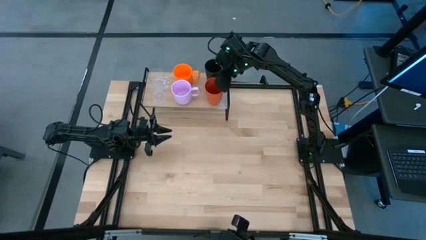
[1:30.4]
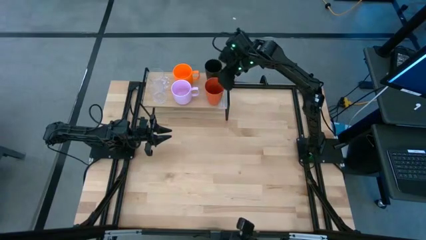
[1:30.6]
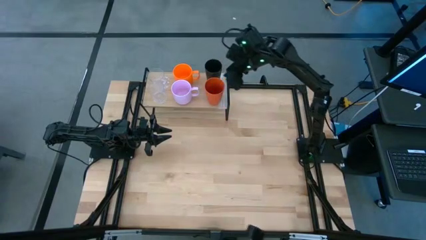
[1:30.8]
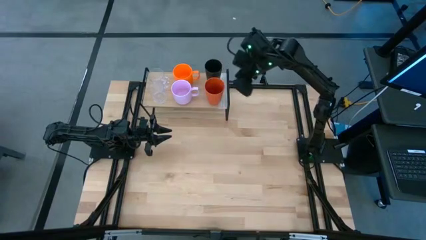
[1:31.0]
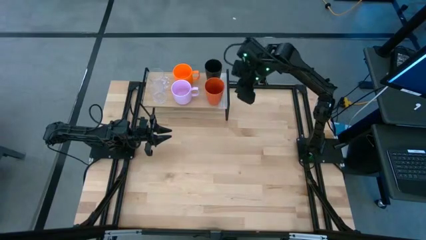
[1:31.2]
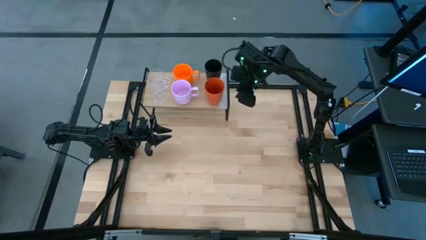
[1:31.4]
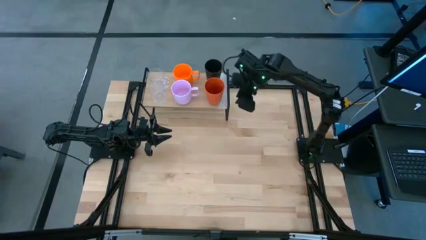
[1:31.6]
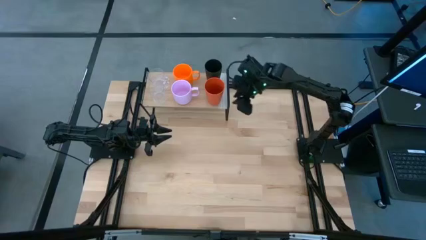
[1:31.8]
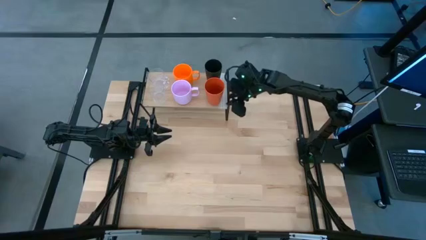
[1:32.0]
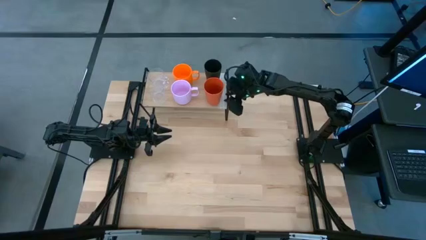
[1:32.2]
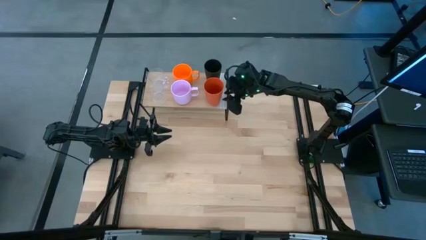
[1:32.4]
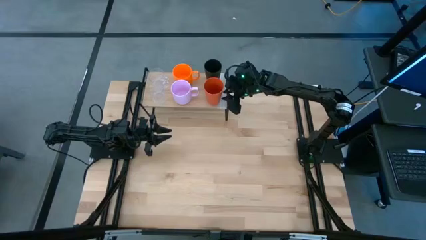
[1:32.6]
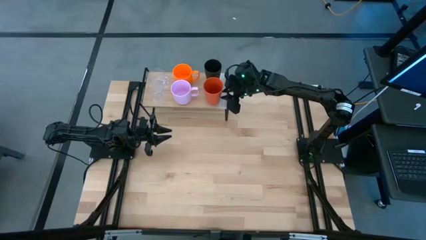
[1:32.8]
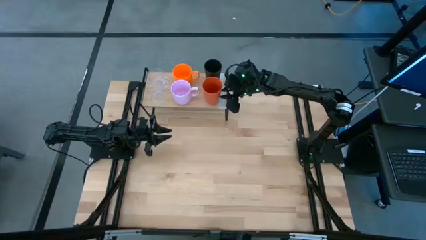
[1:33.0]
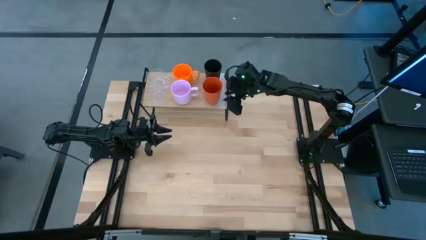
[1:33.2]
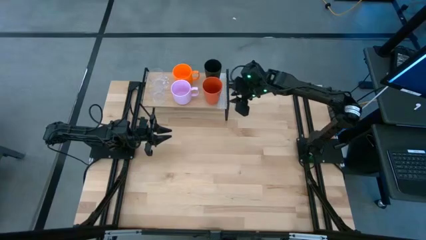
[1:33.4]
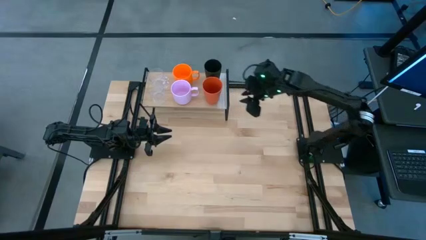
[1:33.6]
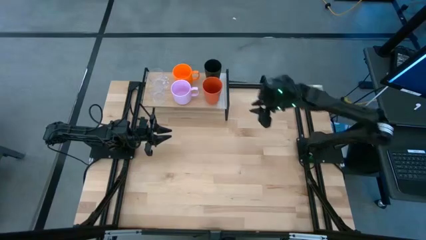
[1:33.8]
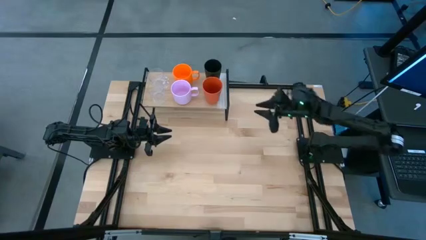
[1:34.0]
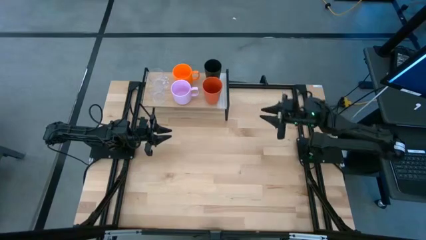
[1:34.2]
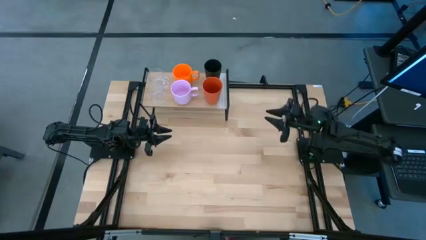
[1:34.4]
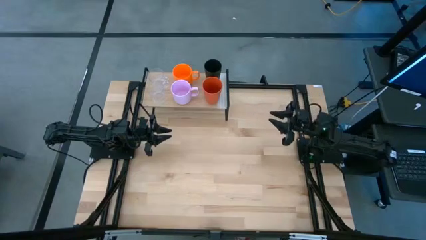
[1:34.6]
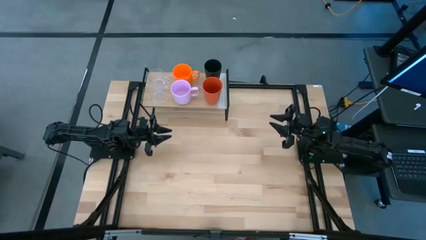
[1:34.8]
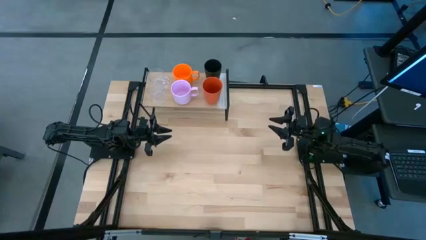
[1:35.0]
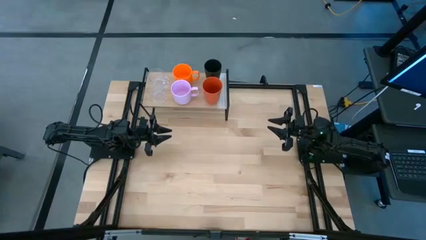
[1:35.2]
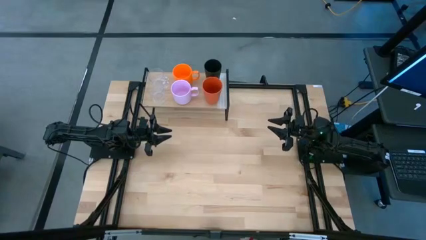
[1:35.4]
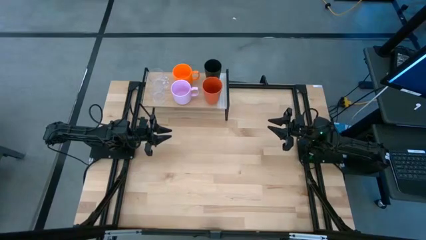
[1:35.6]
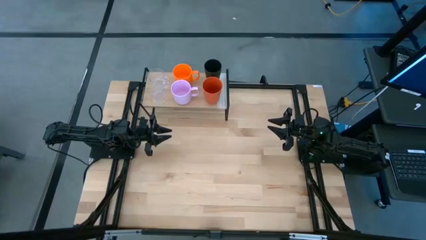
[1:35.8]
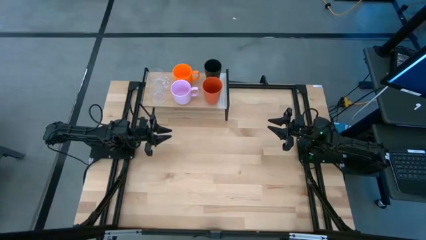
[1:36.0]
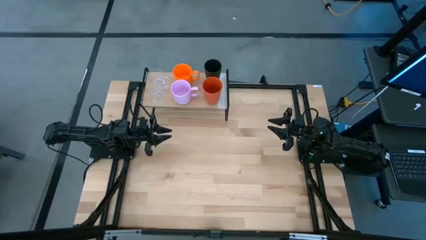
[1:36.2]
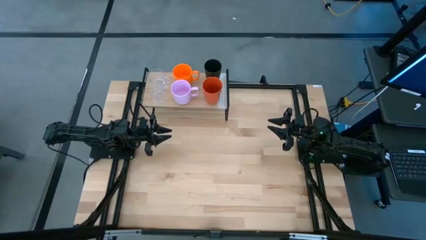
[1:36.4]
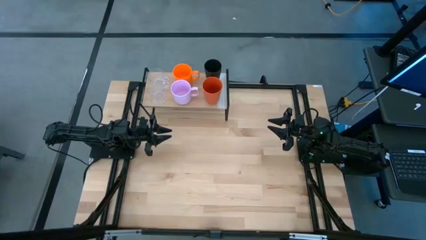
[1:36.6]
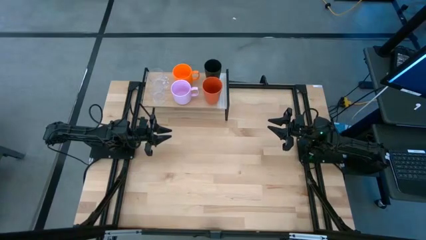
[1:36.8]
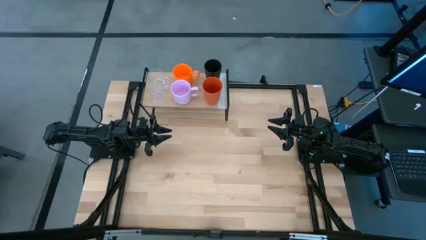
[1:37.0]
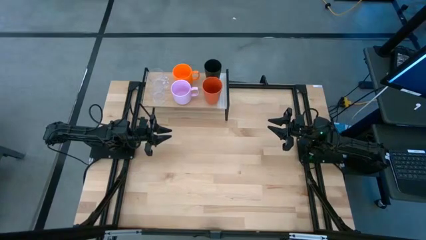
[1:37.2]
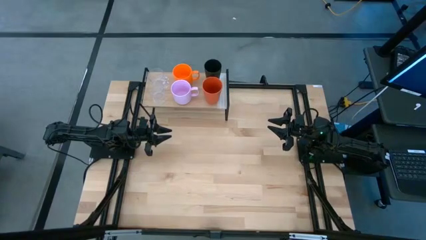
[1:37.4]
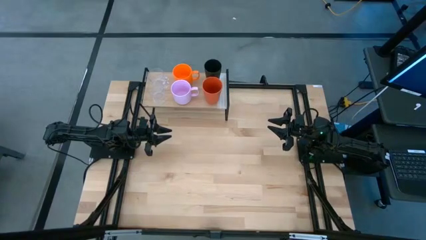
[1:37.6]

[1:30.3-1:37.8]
Task: Stack small to large cups/mugs on shelf
Return to Home Position

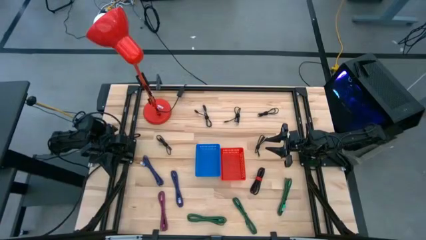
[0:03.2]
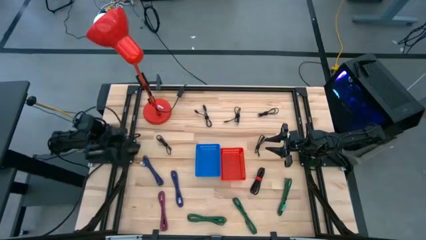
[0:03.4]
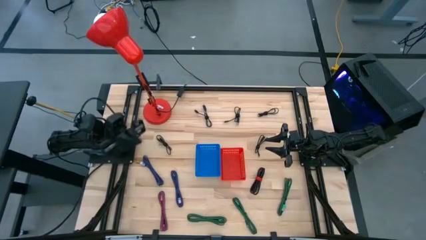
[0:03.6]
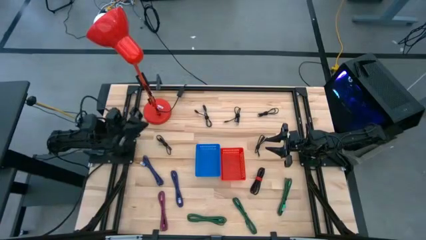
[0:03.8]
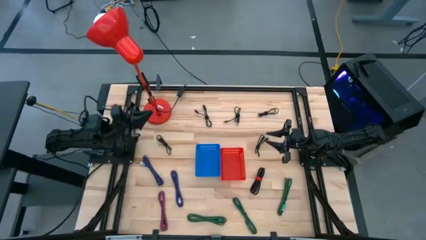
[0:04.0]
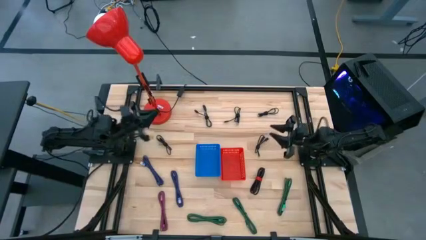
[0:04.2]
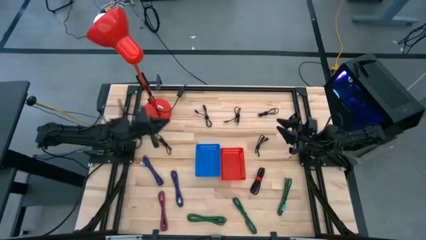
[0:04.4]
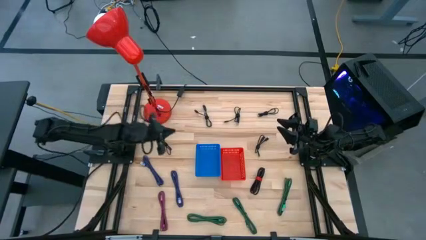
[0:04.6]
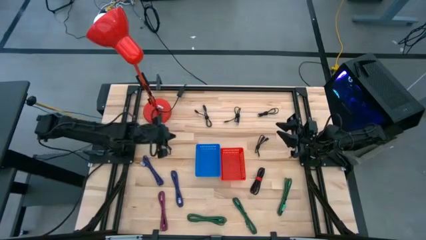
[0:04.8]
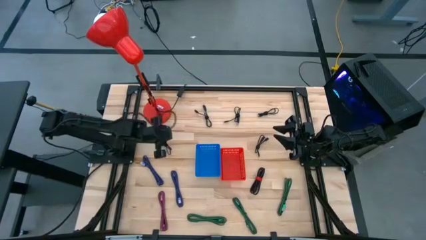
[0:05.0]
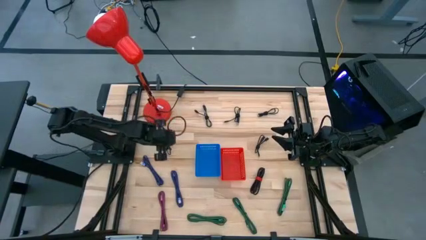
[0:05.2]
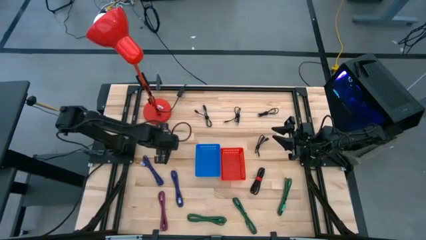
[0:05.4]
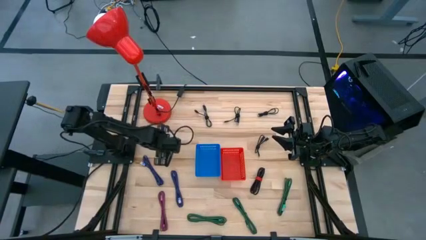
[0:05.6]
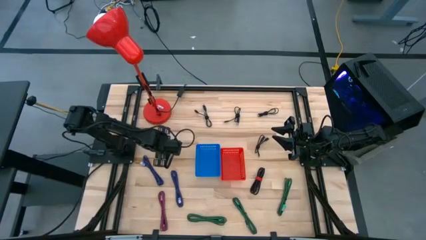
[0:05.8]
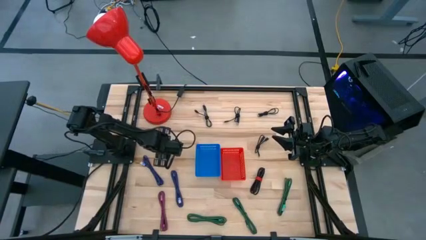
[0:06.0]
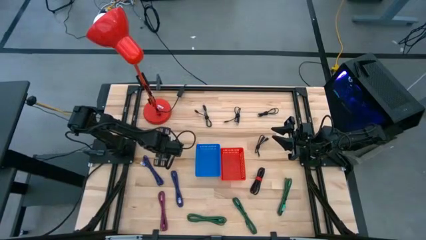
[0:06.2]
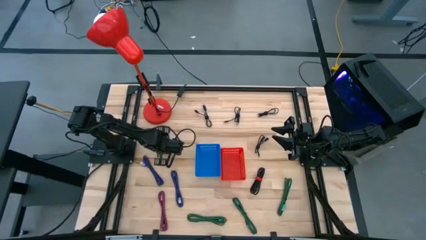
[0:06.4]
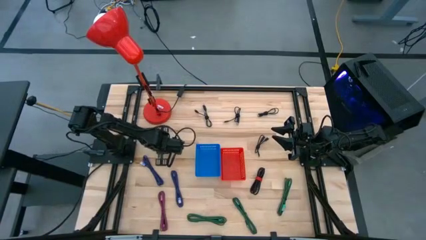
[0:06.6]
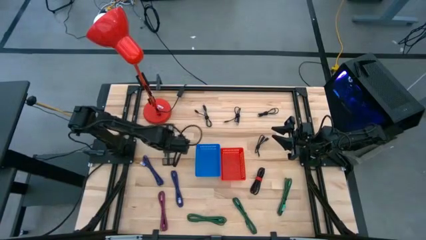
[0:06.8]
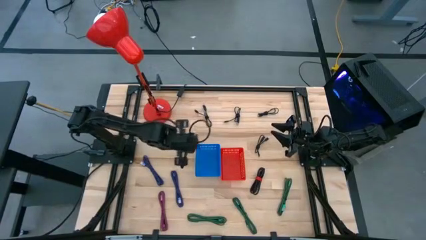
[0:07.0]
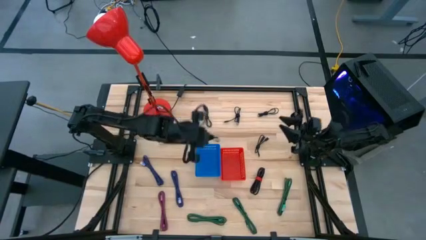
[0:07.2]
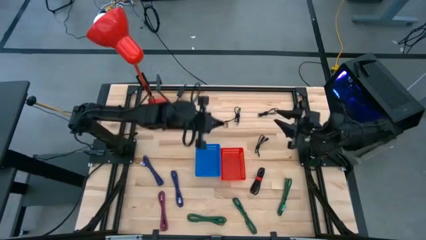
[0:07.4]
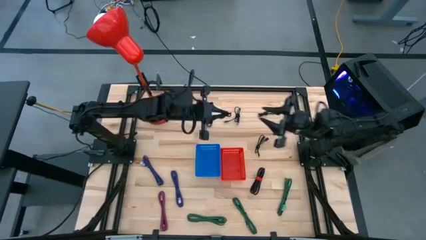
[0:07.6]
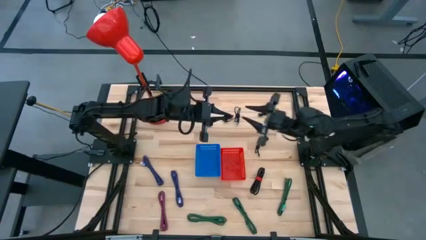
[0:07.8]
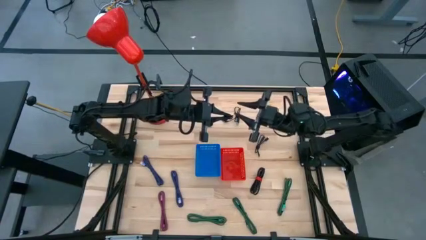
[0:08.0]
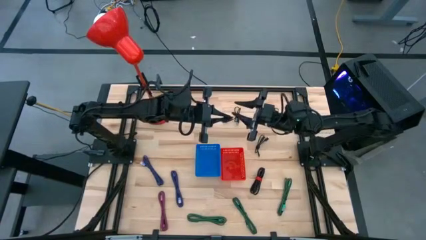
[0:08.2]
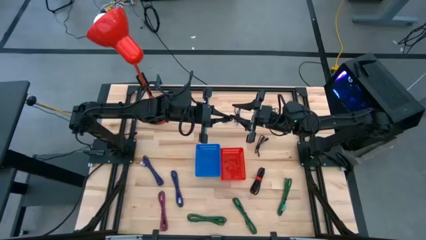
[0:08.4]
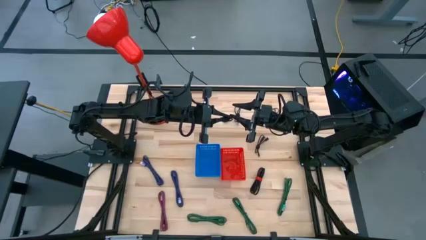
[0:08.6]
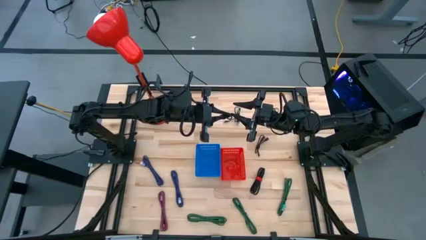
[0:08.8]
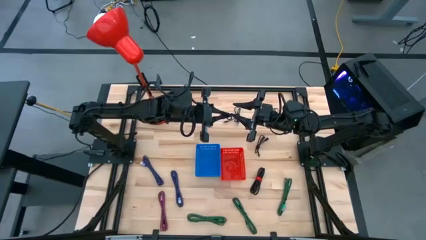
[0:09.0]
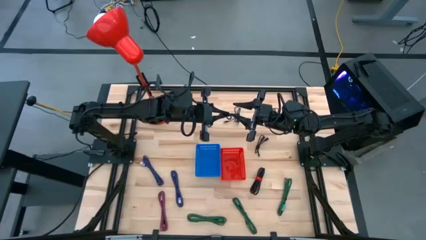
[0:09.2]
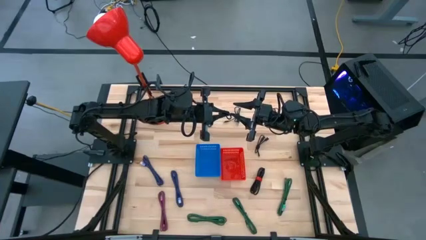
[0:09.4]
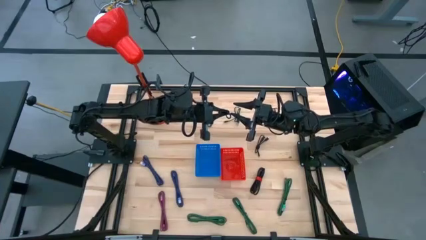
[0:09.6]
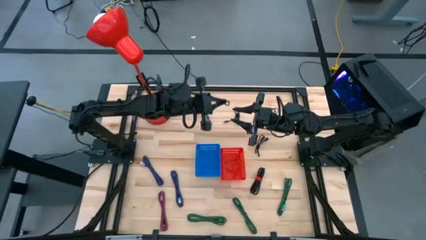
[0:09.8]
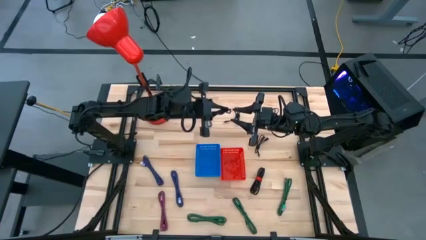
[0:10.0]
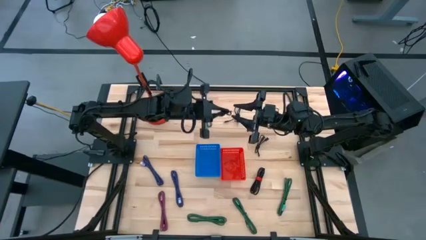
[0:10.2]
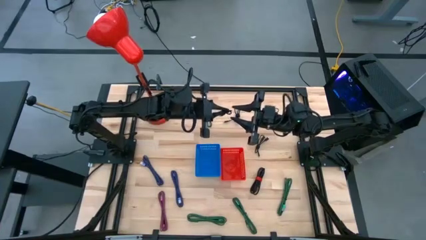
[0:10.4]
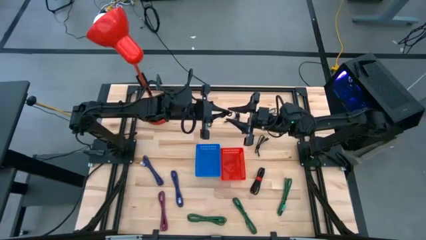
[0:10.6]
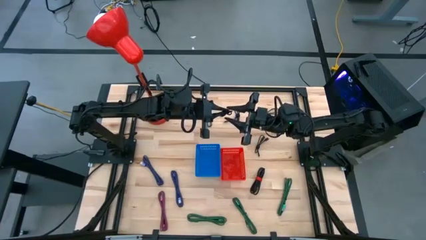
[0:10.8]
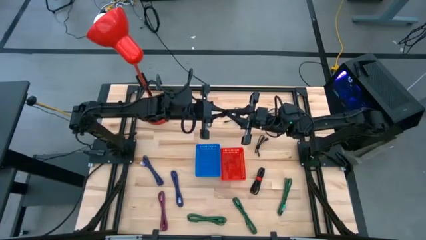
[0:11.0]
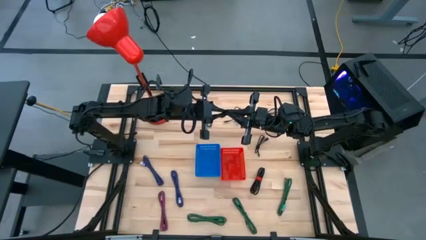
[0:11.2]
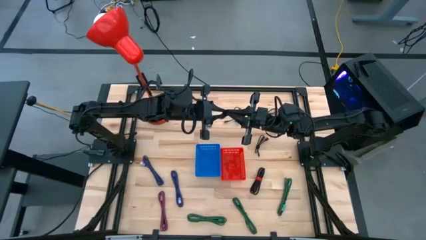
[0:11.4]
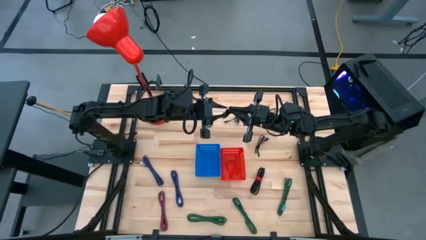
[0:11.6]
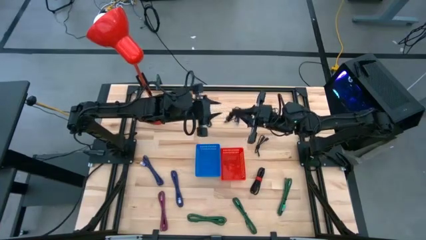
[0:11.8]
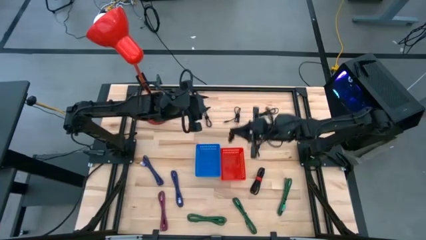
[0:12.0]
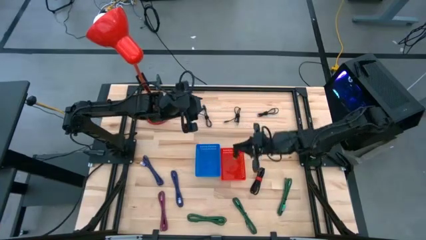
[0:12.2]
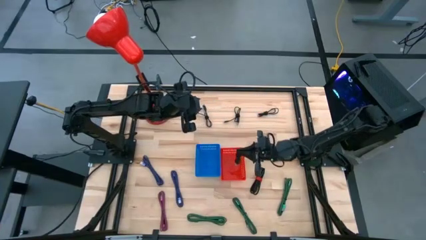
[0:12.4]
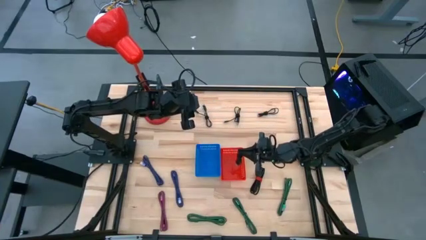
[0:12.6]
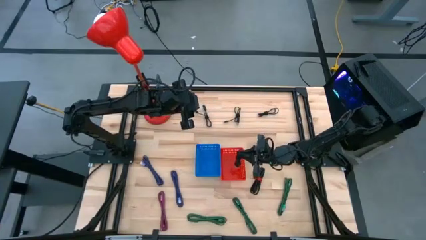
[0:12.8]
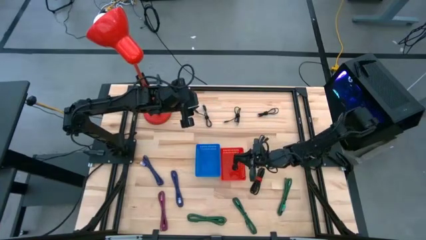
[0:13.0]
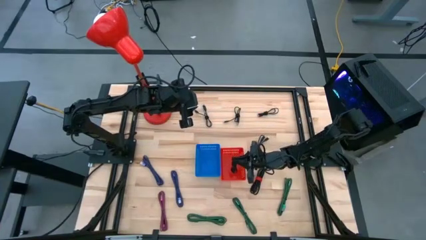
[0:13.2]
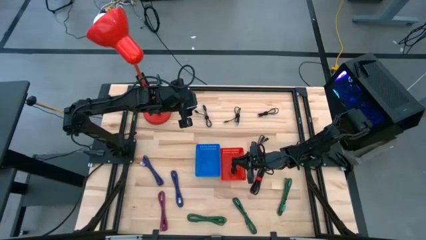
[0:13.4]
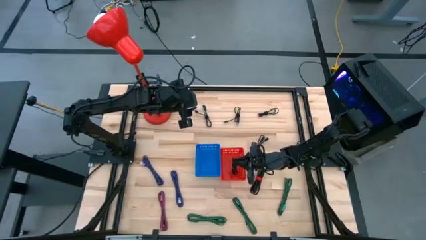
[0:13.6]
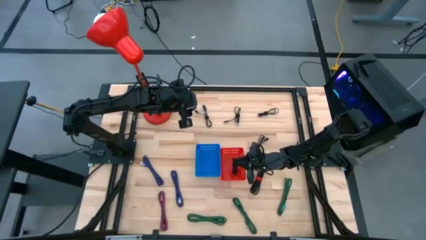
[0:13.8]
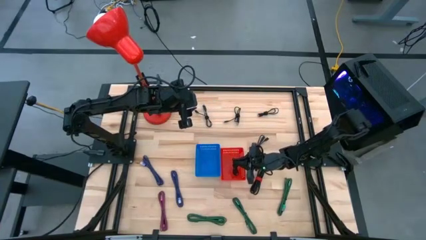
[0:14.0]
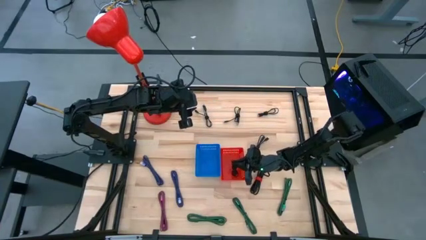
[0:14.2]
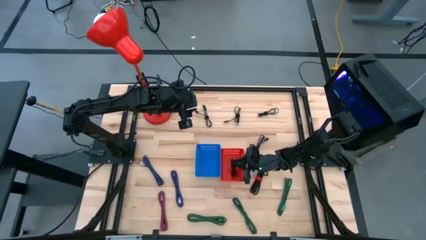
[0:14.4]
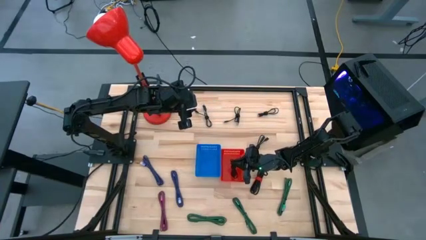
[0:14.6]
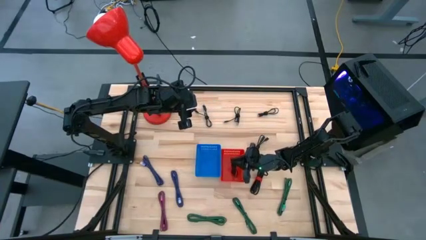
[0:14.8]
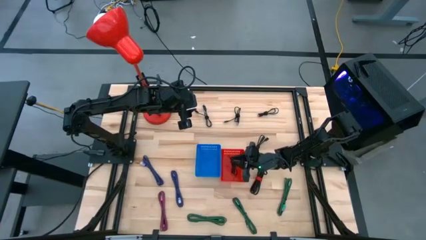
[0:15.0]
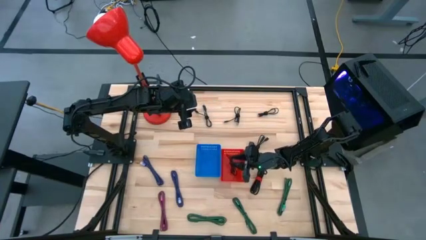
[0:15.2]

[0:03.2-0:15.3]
Task: Pick & Place USB Port
Put the black charger cable into the red bin
